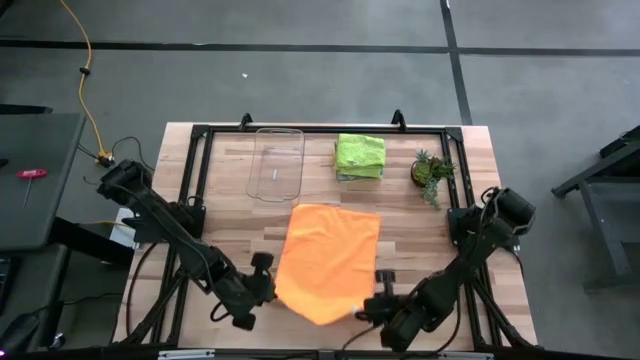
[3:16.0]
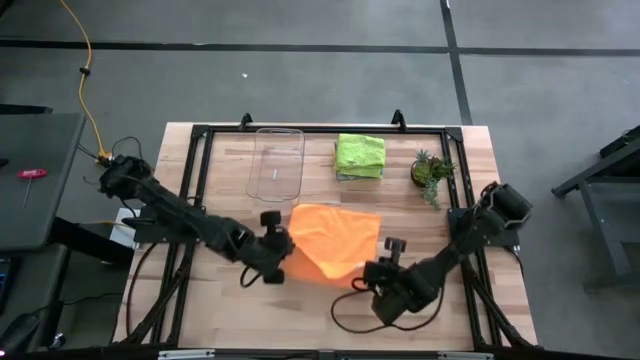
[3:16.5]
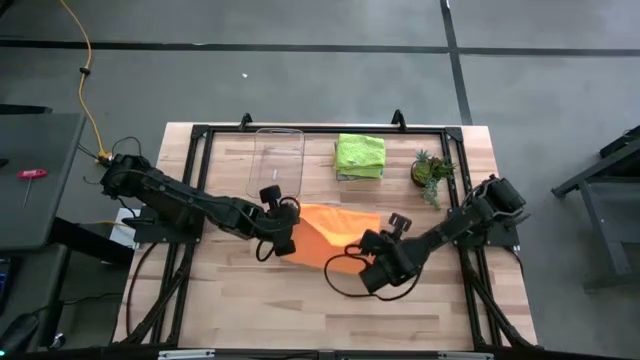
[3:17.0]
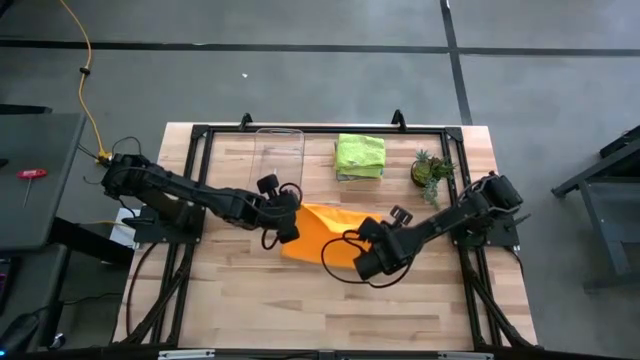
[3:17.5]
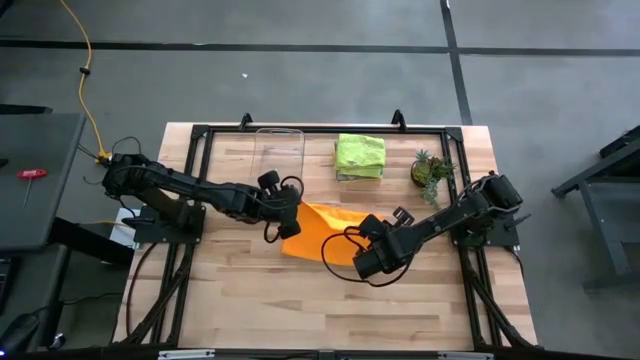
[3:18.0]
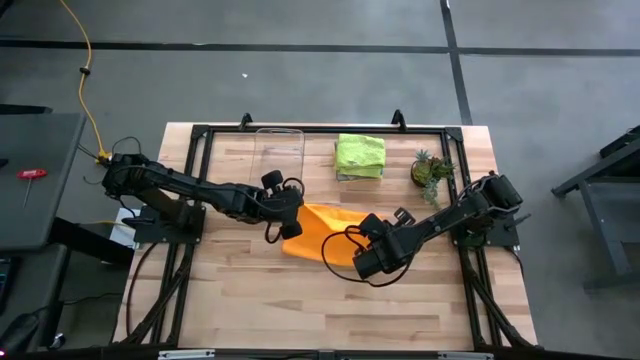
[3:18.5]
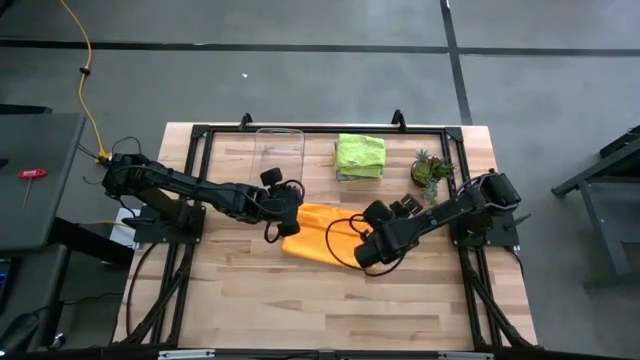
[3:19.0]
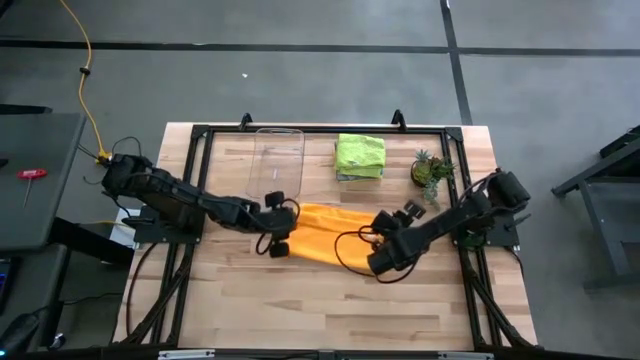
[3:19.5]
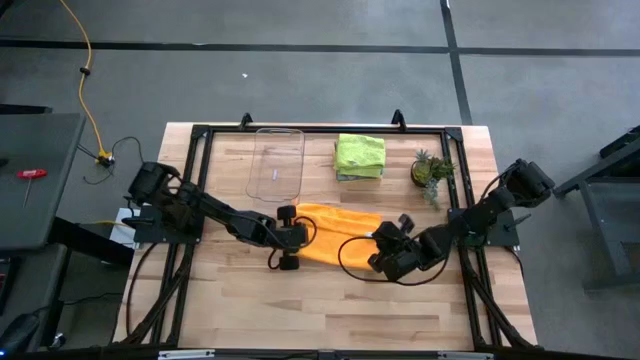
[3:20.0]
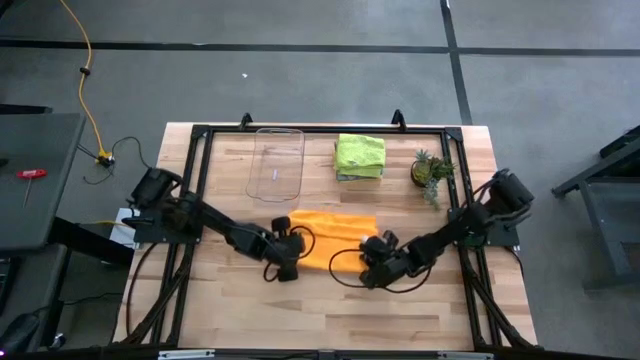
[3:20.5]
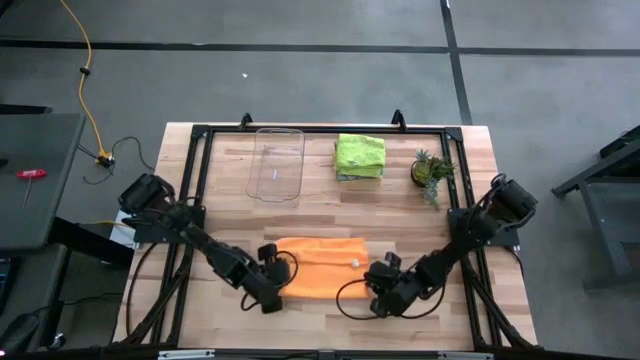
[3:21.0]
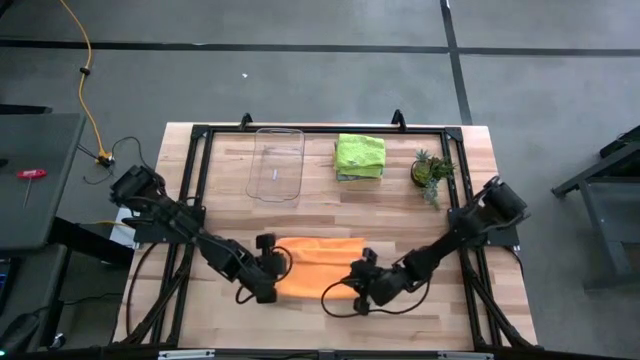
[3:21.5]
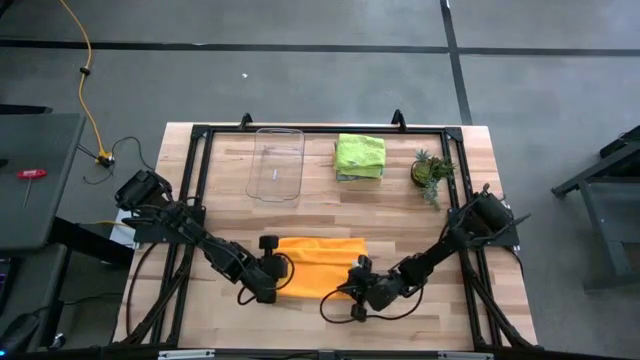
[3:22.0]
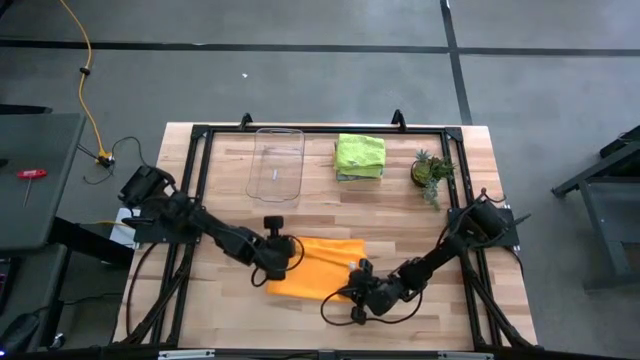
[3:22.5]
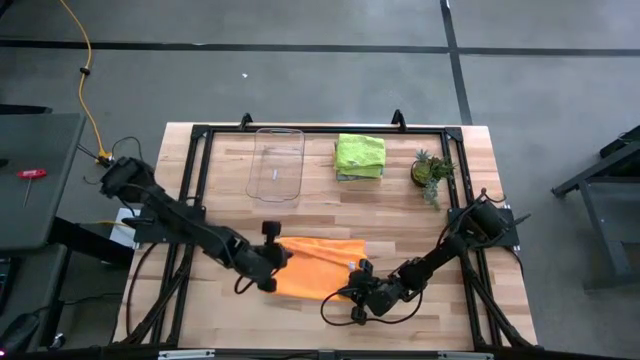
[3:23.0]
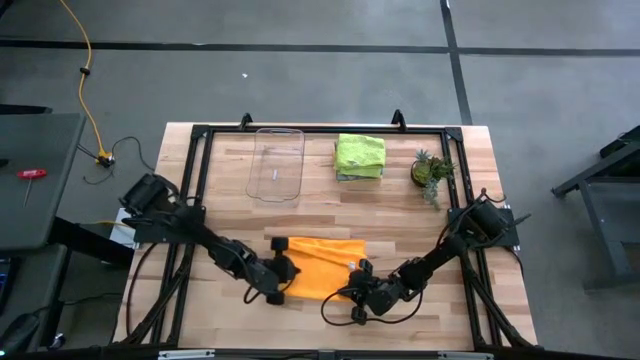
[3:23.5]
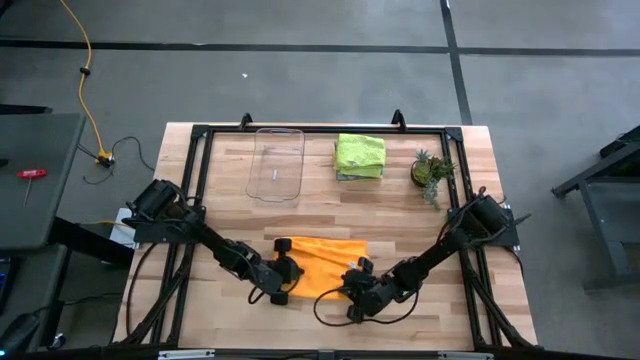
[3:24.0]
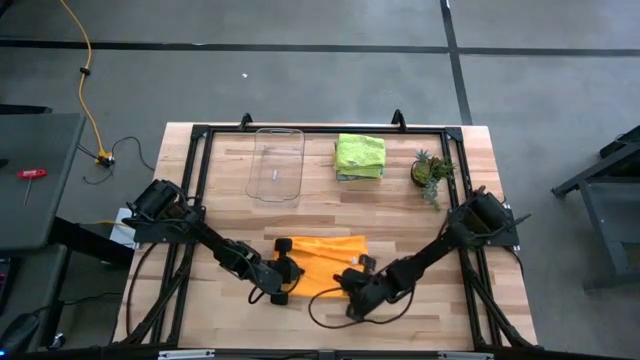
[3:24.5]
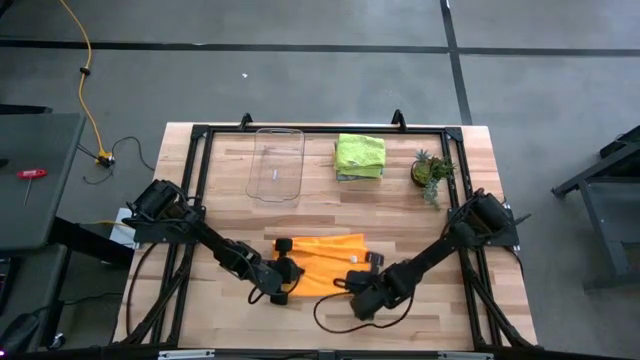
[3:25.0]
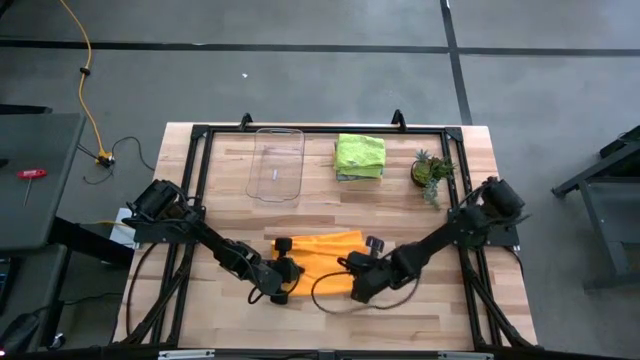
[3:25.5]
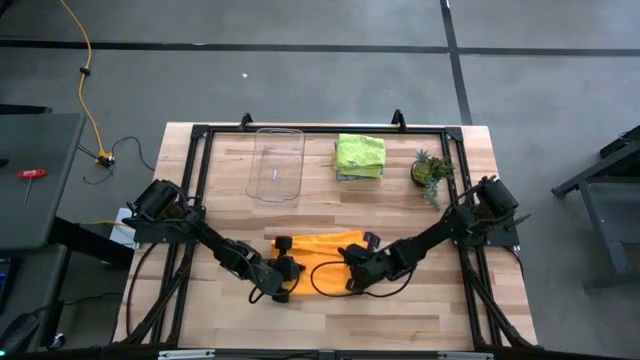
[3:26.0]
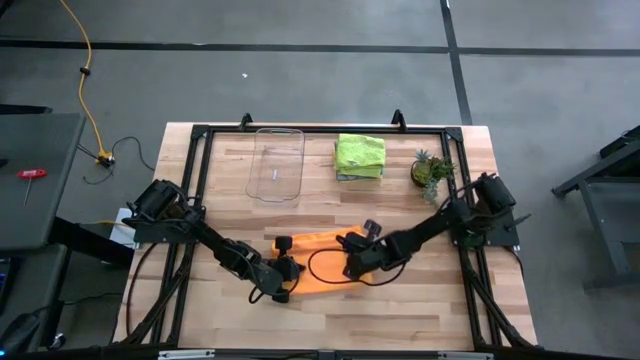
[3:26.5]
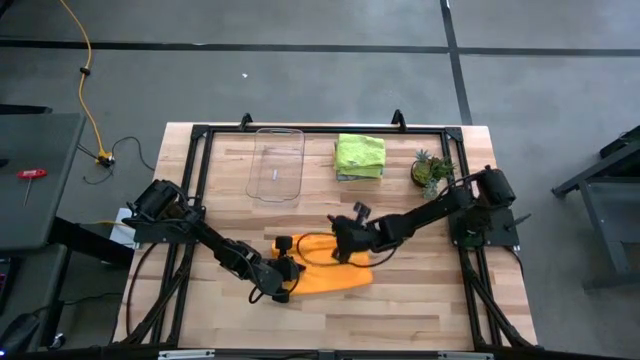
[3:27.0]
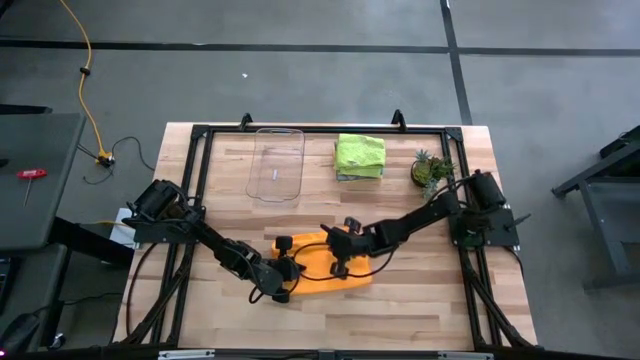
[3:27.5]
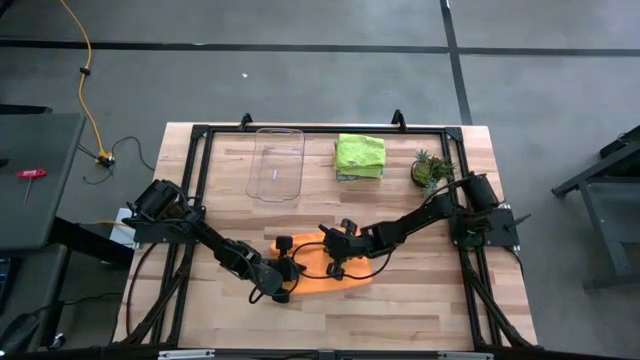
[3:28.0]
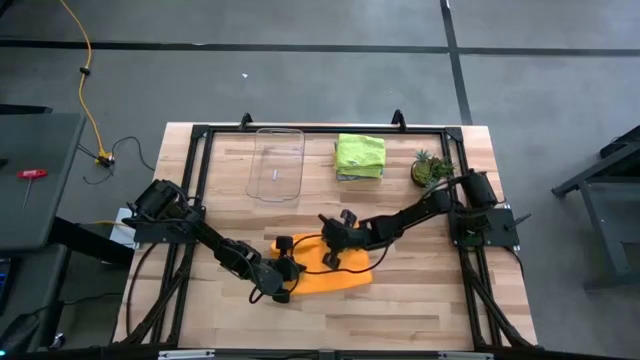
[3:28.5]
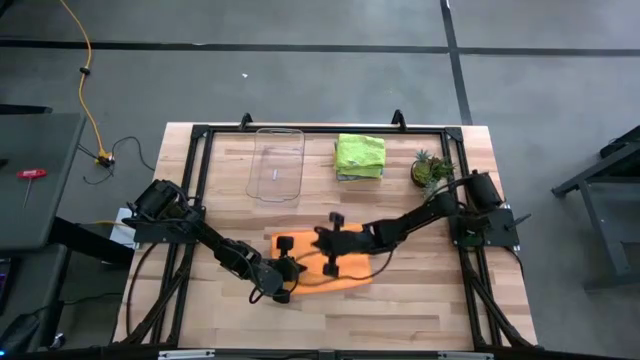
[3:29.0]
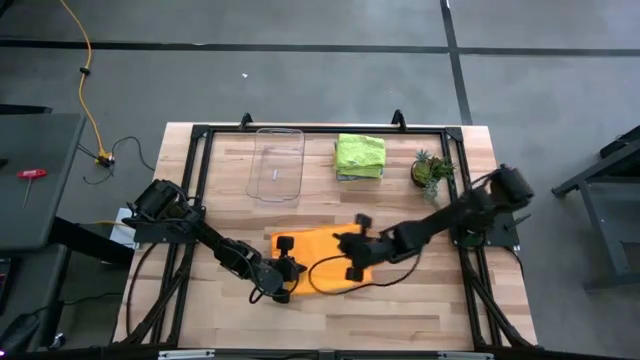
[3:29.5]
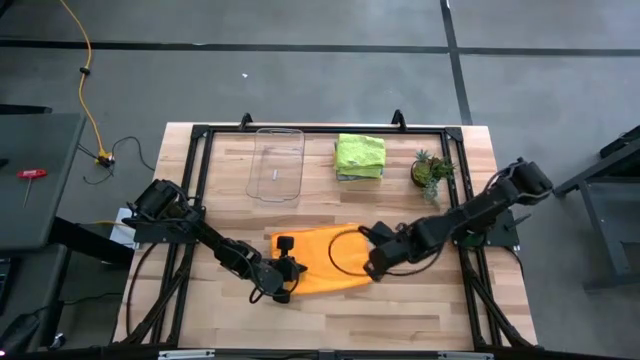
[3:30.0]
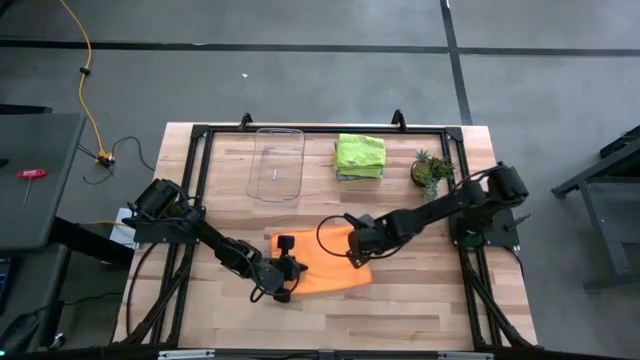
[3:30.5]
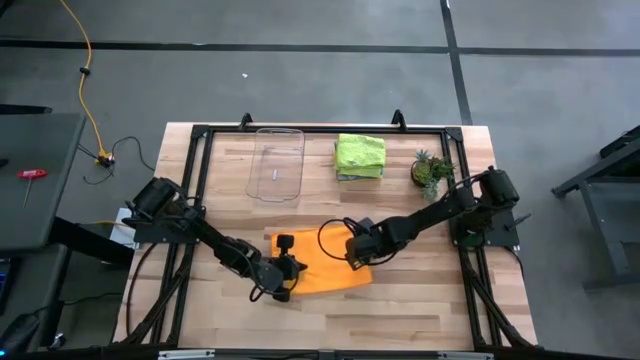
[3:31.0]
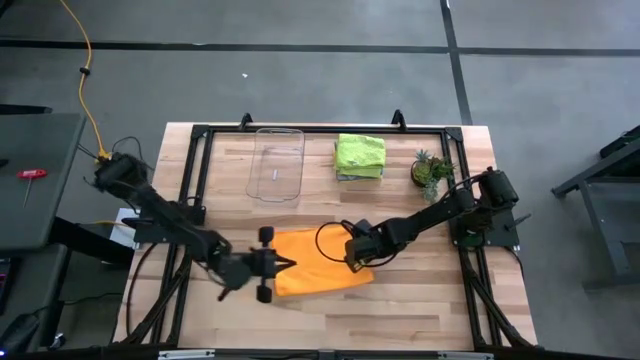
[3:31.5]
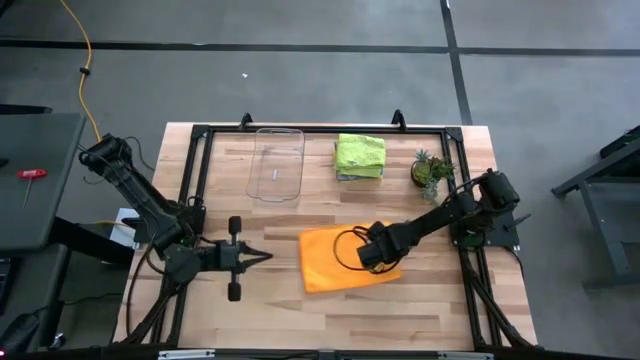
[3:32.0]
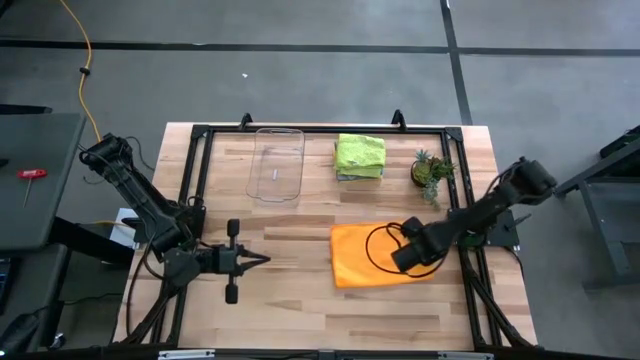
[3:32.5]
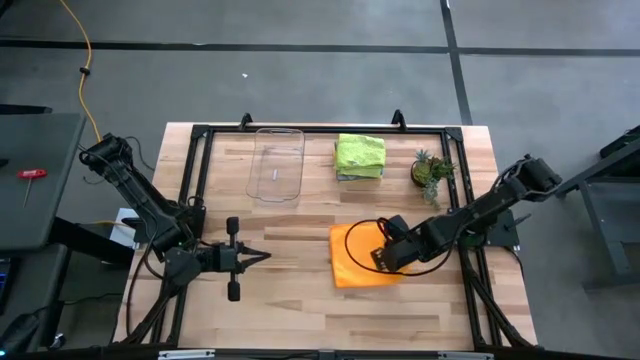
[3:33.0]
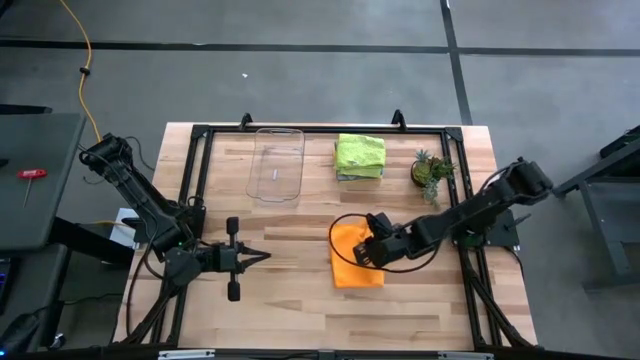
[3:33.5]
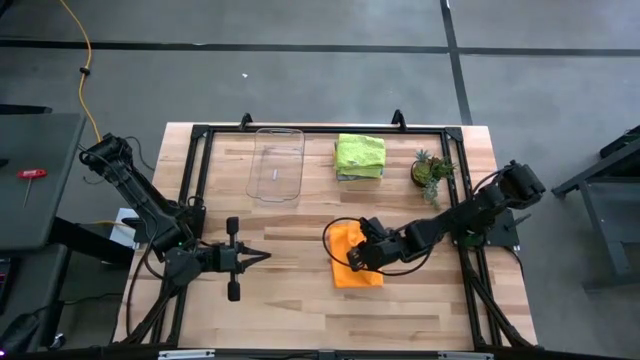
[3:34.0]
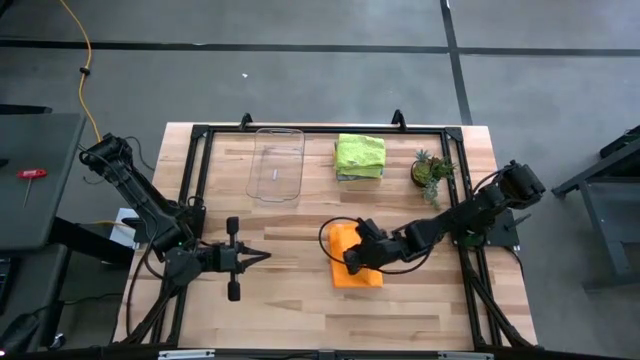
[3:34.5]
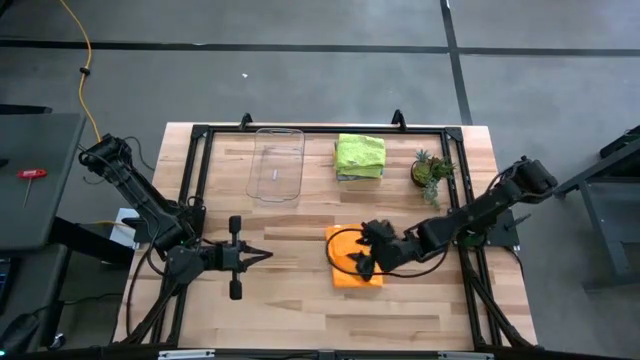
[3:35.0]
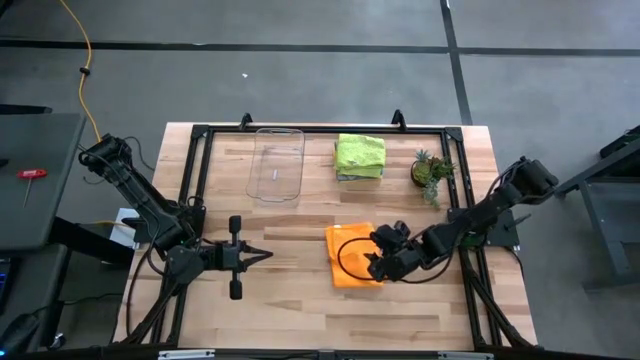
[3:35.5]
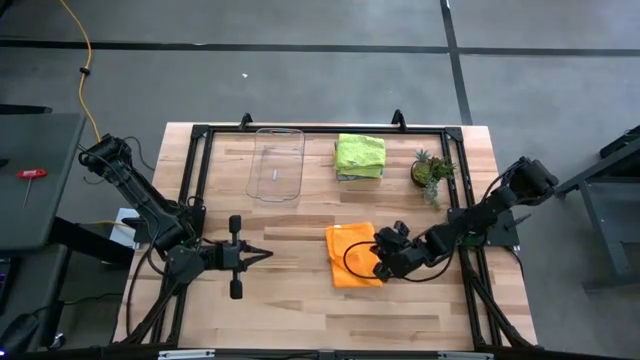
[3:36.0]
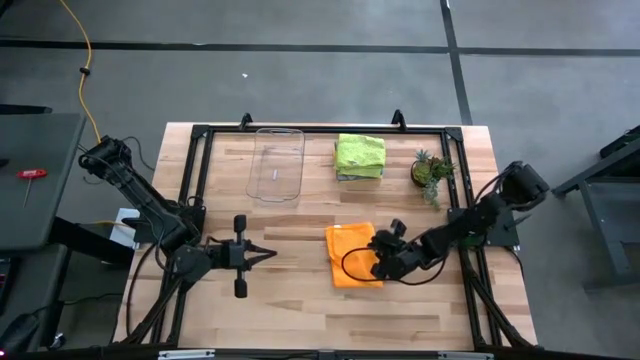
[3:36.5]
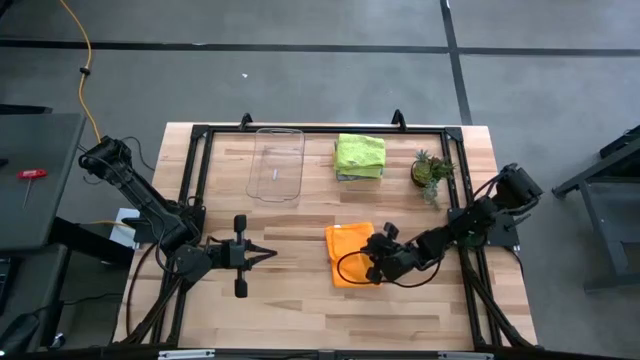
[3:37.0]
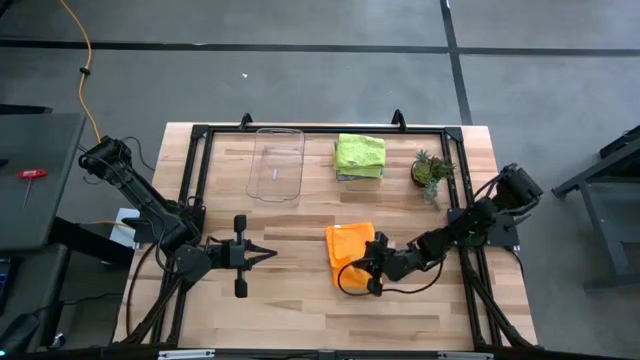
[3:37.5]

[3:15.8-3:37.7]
Task: Fold microfiber towels
Fold the orange microfiber cloth
